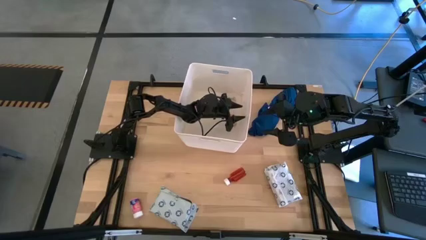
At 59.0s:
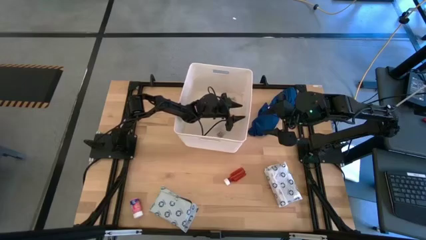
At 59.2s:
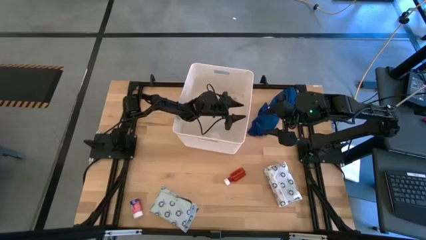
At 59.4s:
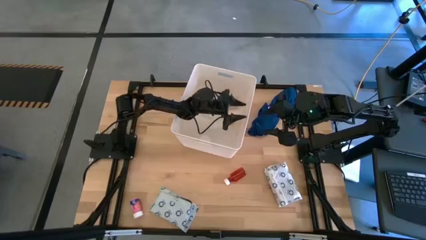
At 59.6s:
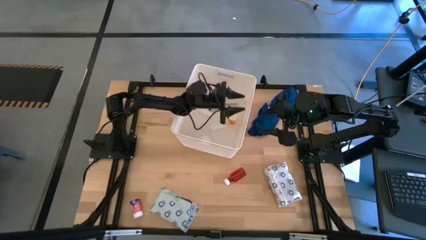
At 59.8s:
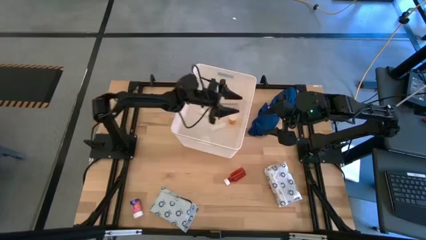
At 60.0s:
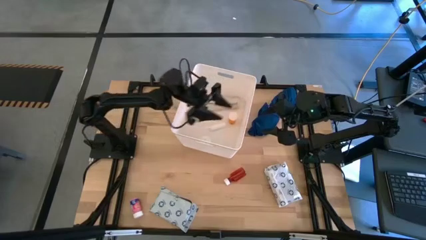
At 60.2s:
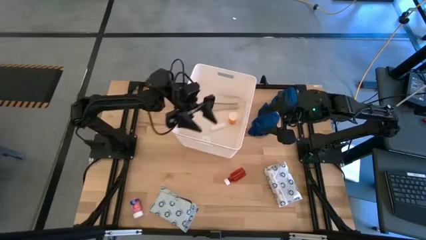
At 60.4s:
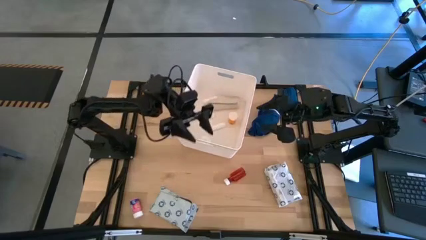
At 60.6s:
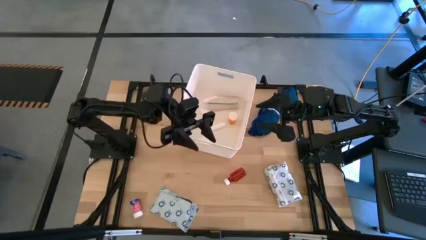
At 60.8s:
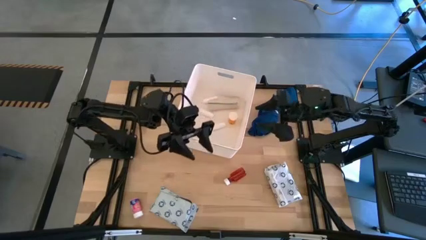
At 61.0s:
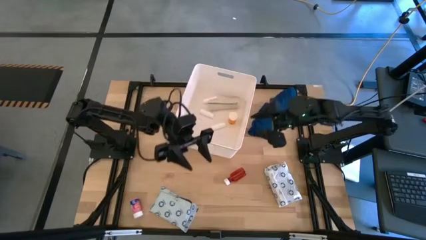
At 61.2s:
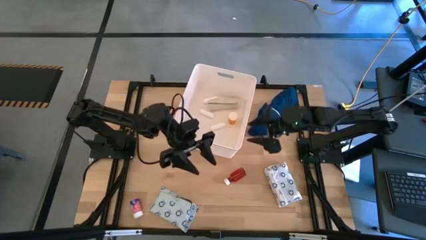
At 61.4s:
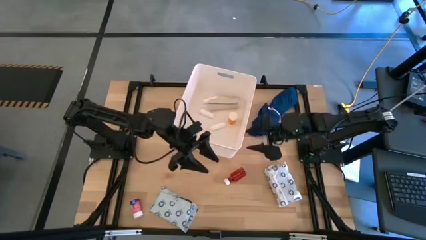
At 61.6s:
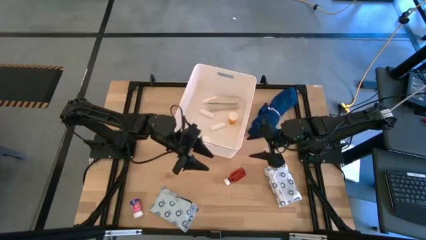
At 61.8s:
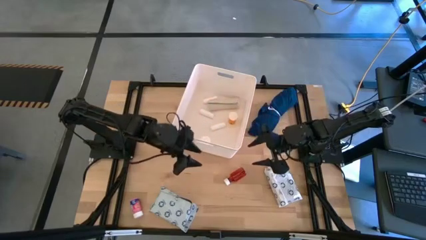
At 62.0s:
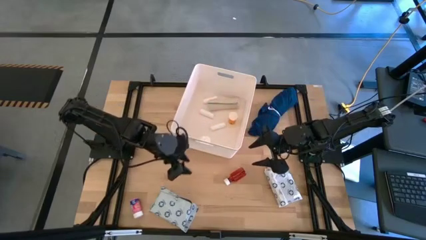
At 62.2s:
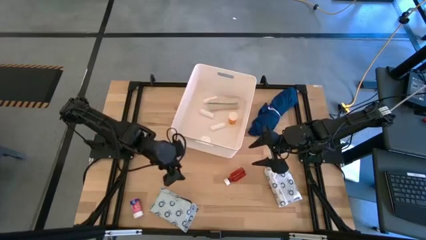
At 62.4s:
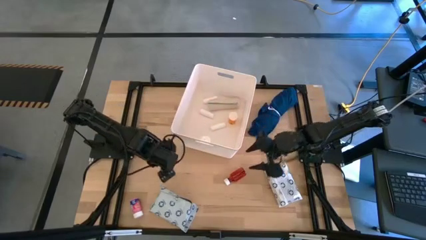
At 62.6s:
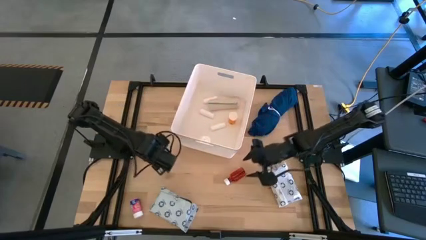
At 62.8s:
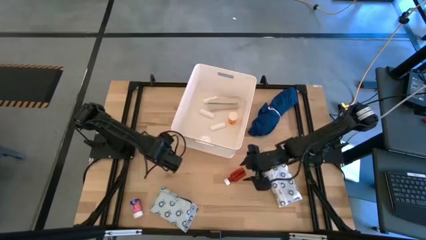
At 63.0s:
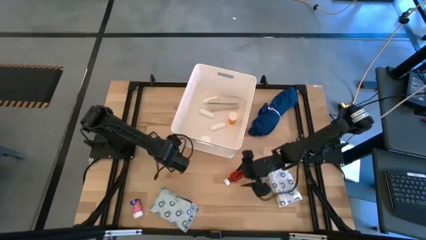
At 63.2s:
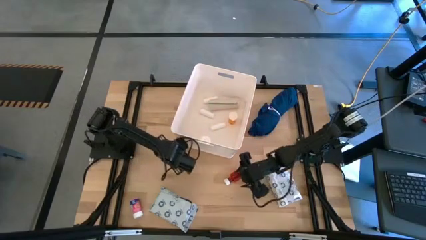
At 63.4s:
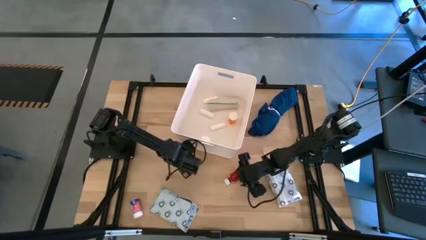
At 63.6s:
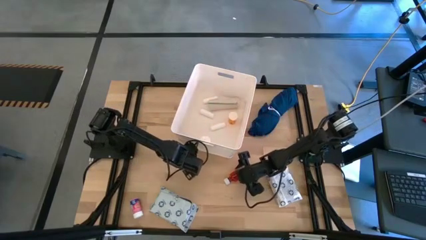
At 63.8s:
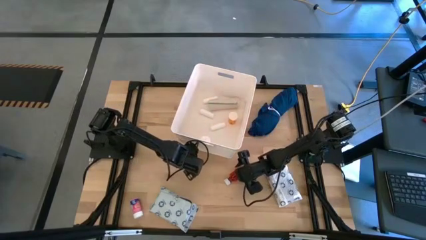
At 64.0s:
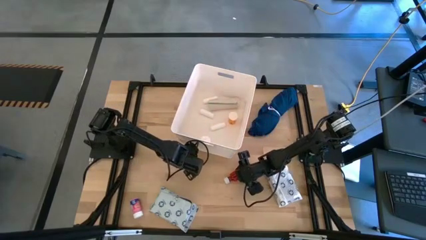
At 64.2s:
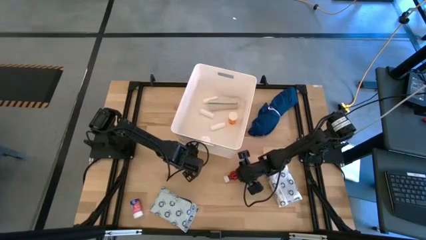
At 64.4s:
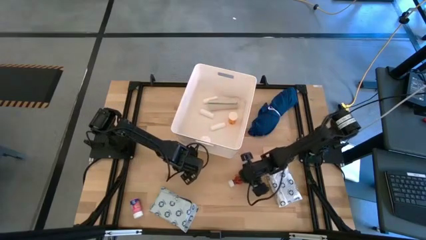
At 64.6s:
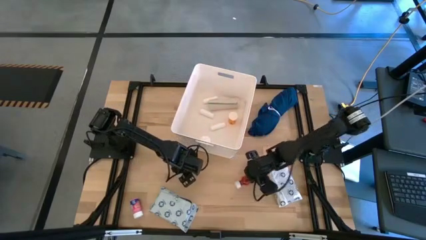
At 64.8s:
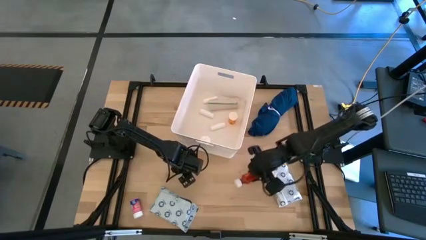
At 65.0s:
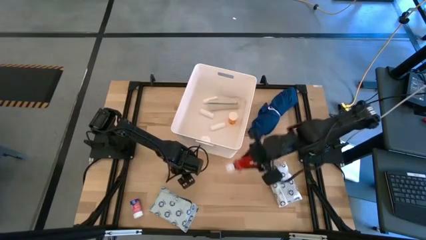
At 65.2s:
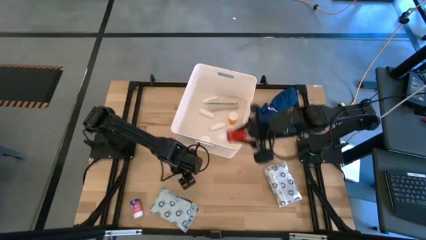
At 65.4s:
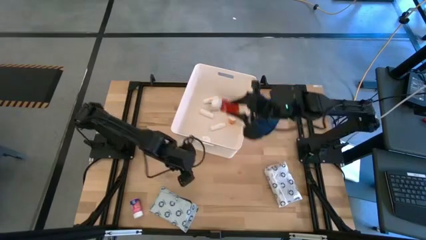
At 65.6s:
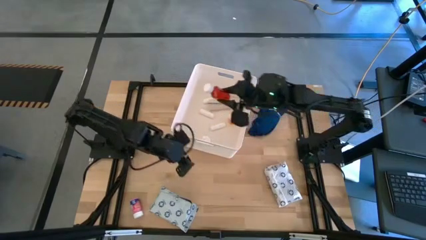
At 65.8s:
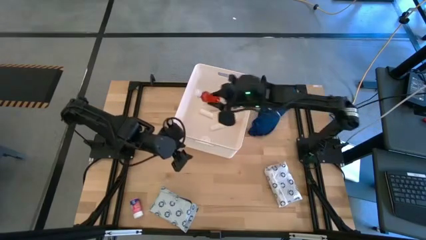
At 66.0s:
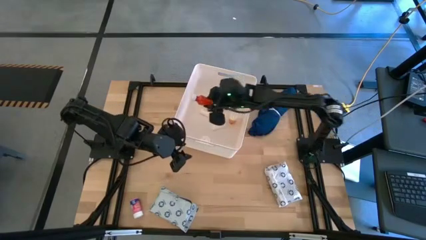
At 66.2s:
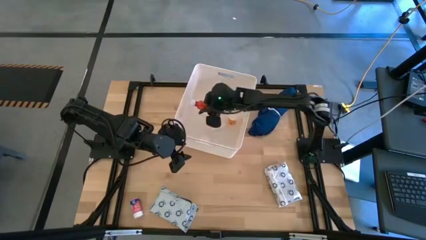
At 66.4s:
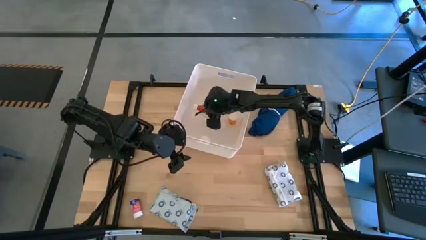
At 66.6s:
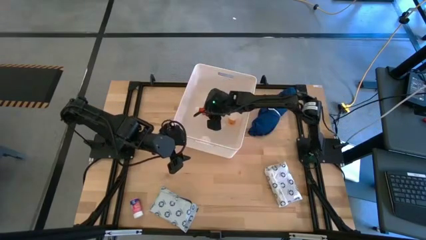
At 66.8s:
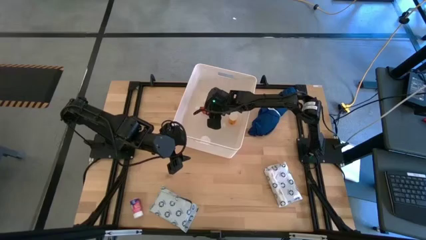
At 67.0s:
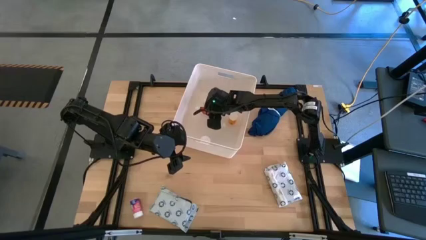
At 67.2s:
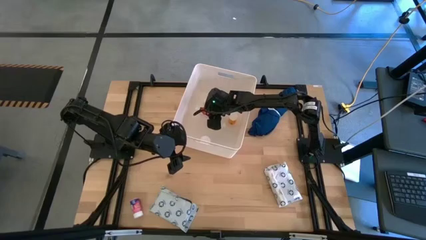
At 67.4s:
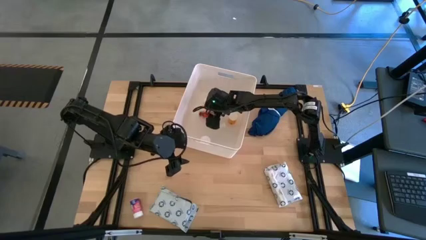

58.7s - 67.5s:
Task: Pick & place medical supplies in basket/bin
Put the red pill bottle into the white basket

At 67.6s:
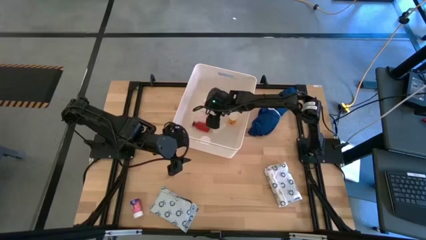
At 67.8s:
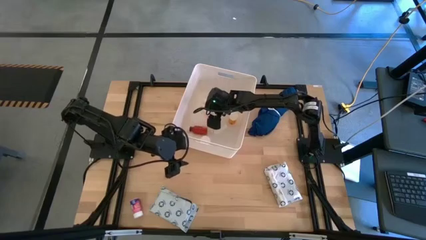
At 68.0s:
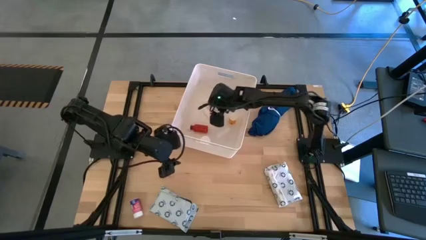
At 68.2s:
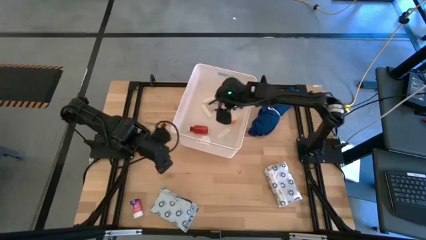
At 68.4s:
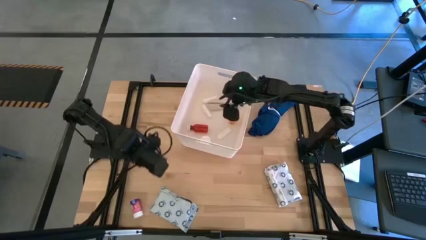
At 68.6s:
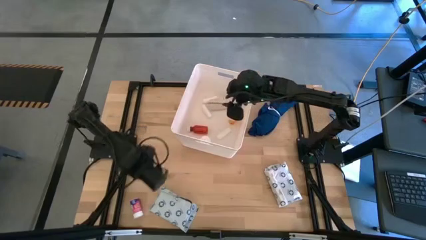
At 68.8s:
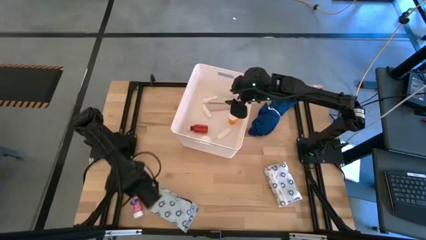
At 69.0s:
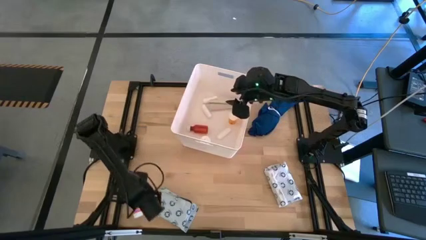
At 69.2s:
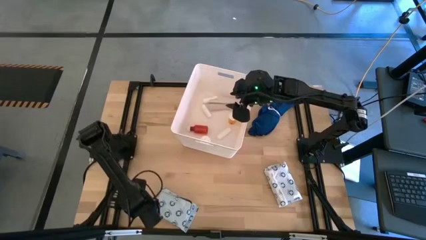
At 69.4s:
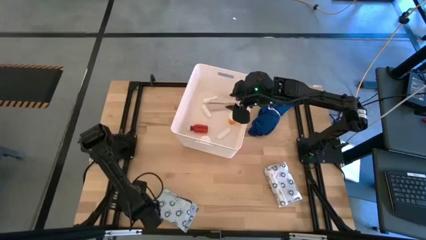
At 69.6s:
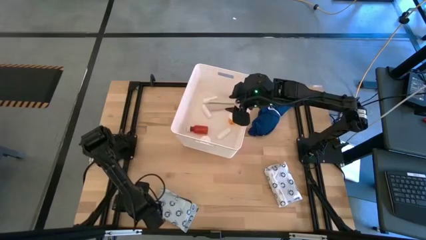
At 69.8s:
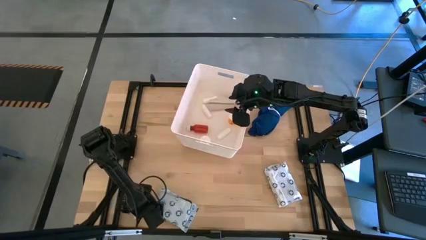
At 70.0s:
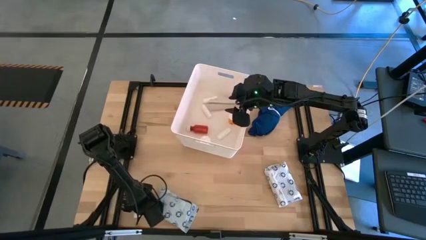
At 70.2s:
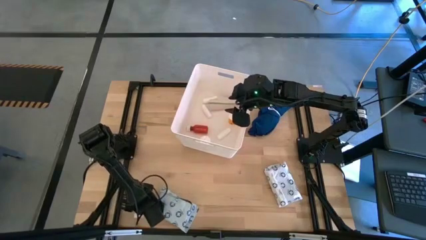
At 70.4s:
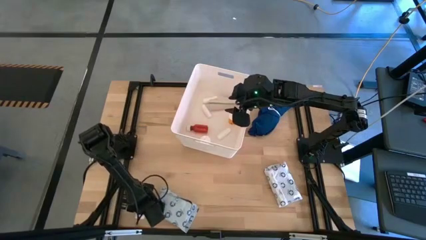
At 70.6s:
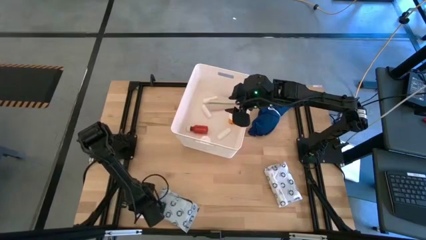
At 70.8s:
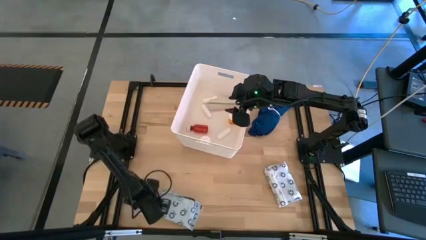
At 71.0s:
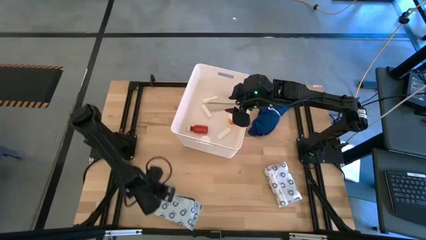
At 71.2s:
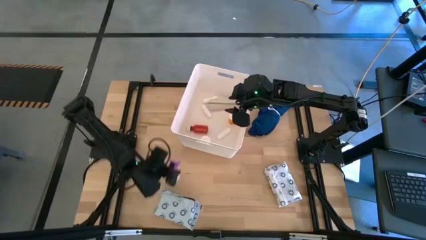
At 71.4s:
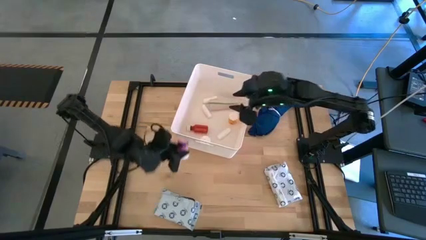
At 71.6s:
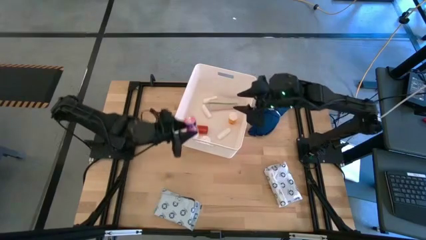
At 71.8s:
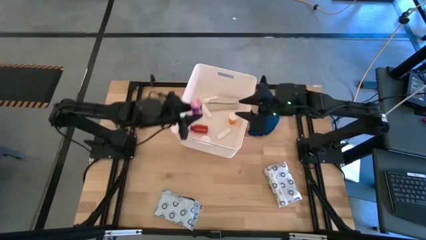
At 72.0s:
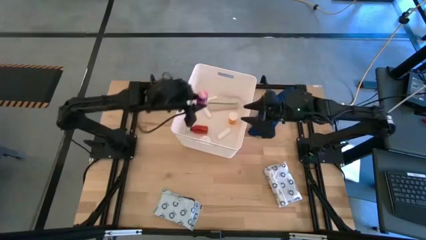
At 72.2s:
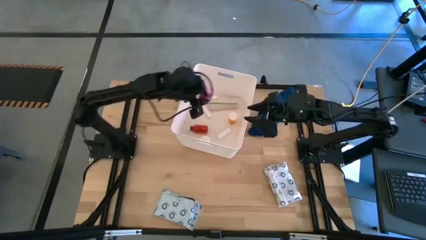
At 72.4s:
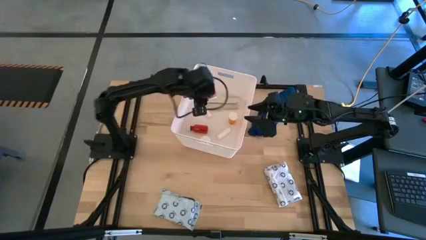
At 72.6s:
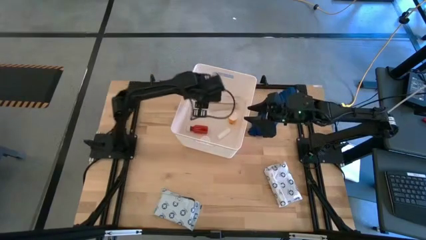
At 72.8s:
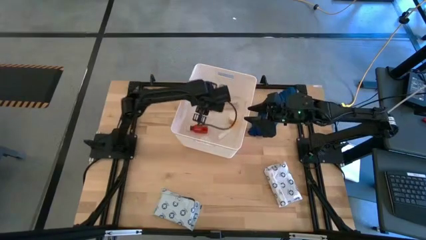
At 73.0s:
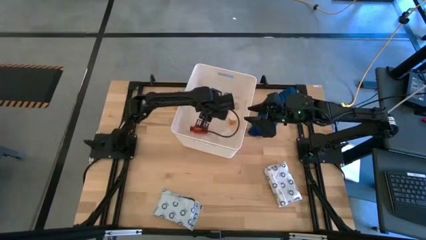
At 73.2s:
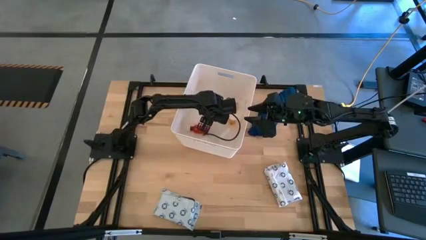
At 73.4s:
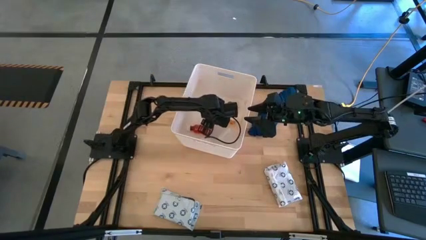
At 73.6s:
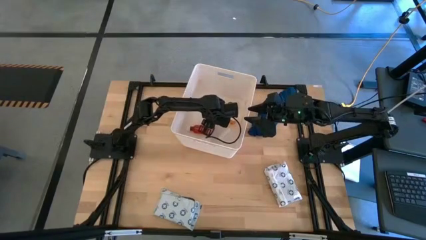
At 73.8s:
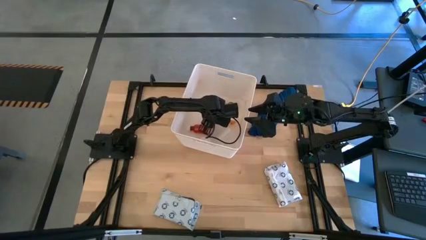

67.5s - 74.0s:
Put the pink pill bottle into the white basket

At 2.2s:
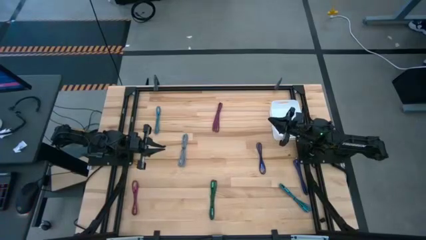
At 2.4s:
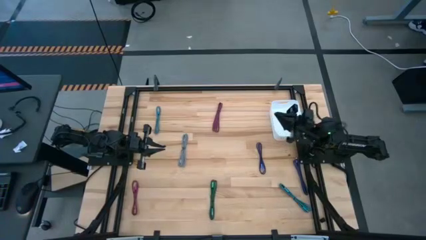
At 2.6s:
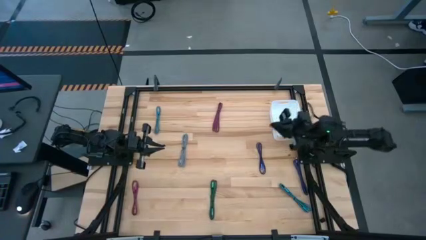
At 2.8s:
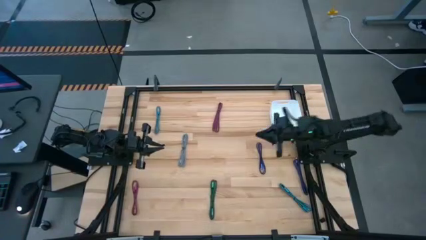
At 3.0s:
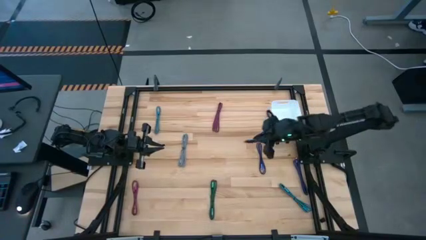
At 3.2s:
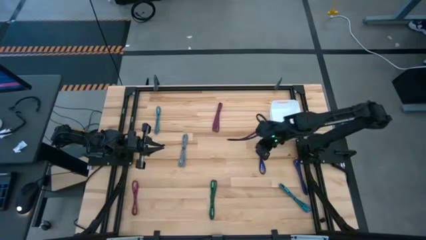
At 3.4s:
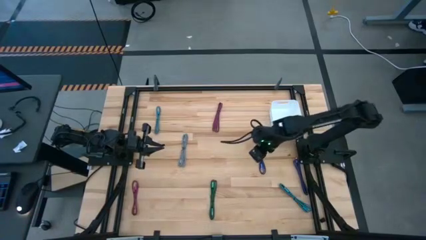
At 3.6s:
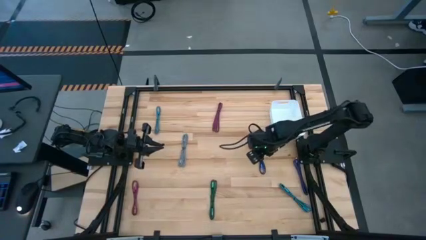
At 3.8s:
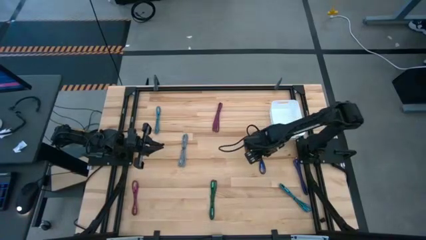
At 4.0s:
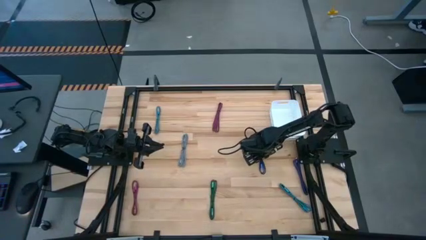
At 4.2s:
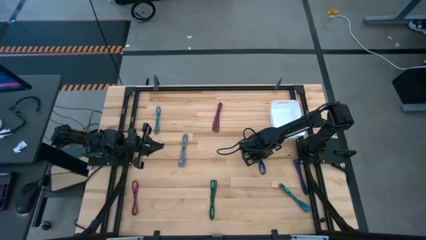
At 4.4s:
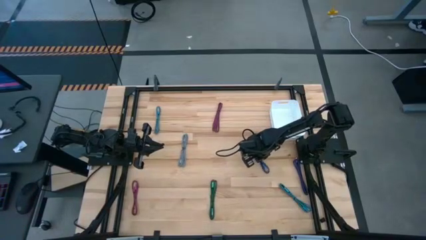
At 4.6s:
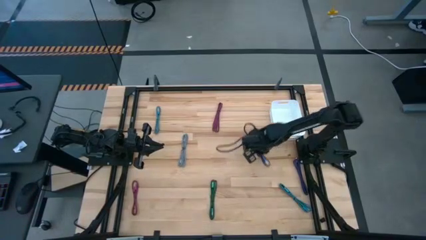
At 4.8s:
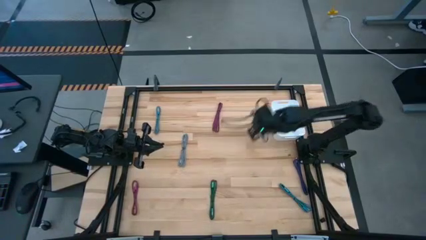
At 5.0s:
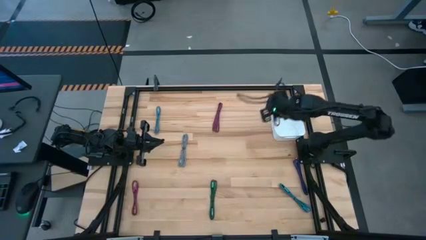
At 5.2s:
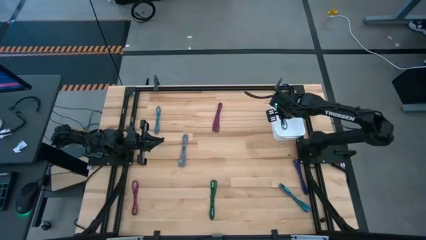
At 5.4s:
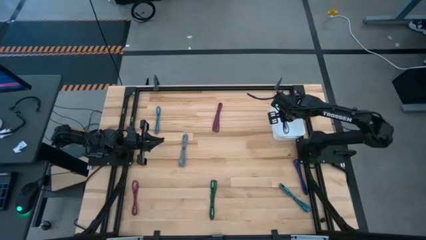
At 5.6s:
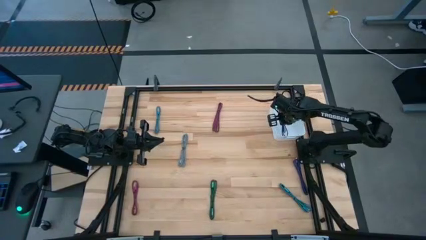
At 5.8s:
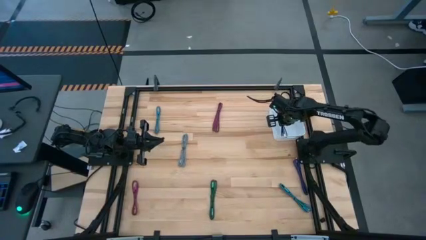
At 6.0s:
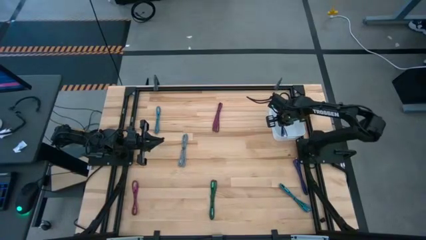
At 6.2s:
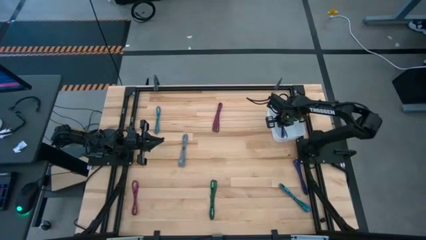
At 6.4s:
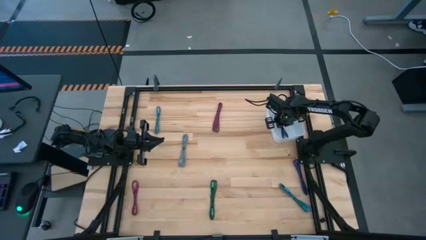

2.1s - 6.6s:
Task: Pick and place USB-C Cables
Put the top violet charger cable into the white bin
